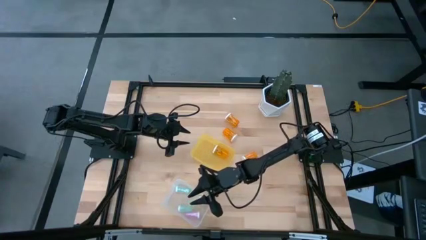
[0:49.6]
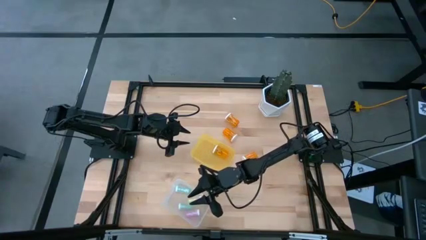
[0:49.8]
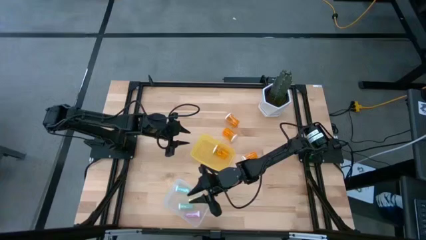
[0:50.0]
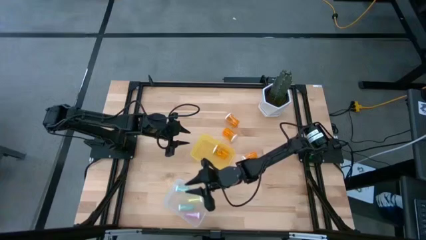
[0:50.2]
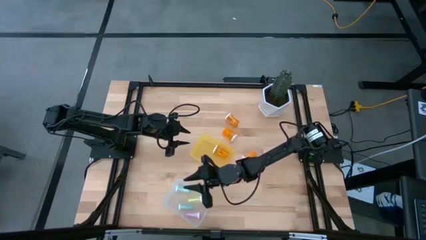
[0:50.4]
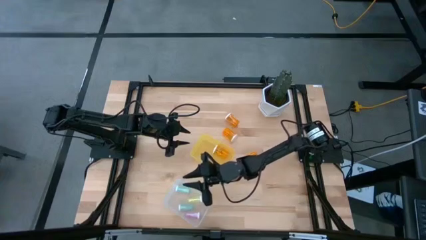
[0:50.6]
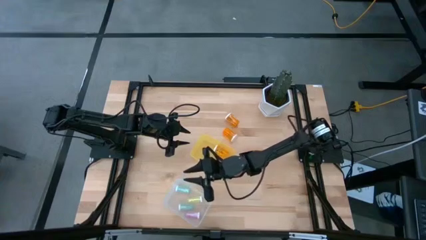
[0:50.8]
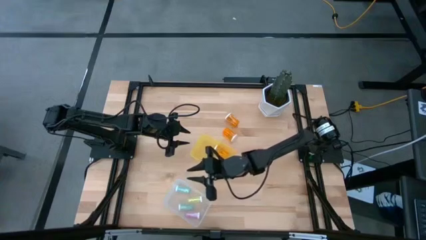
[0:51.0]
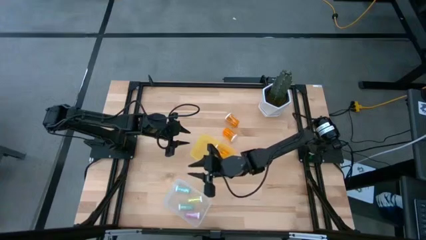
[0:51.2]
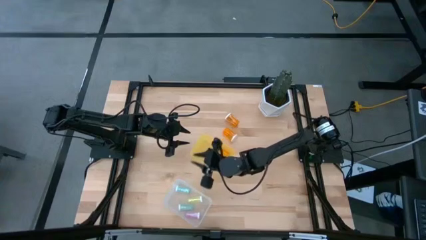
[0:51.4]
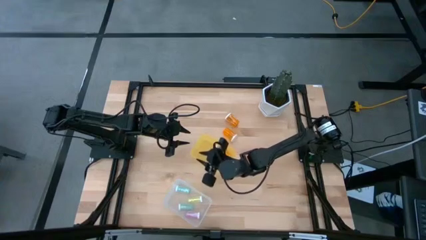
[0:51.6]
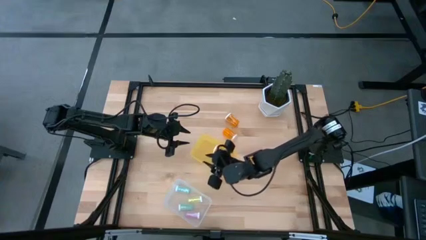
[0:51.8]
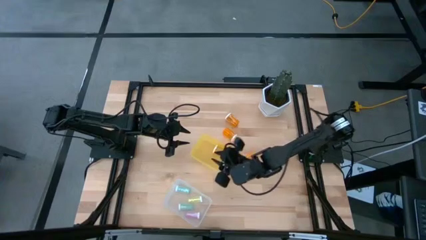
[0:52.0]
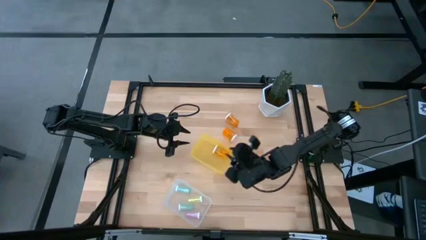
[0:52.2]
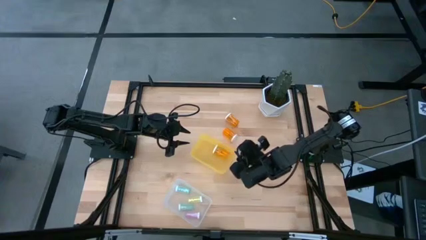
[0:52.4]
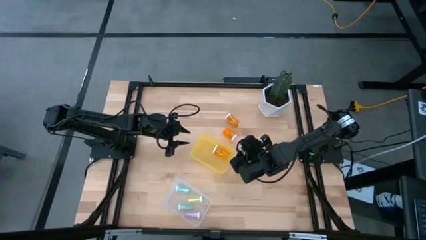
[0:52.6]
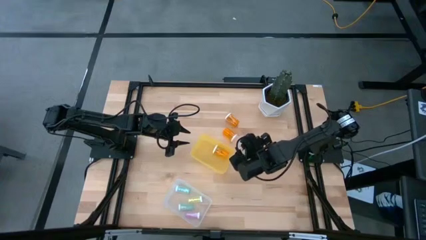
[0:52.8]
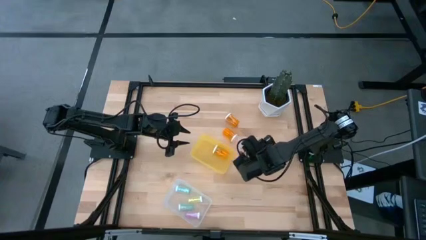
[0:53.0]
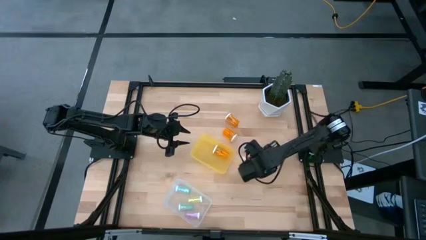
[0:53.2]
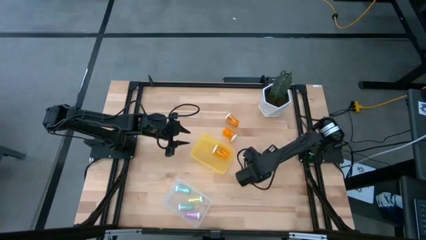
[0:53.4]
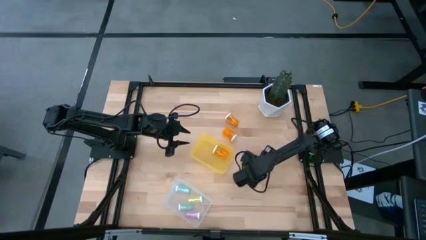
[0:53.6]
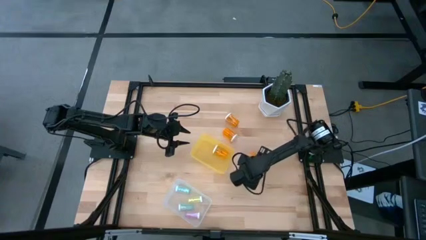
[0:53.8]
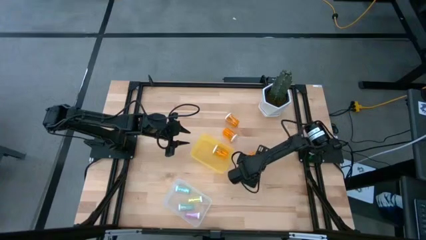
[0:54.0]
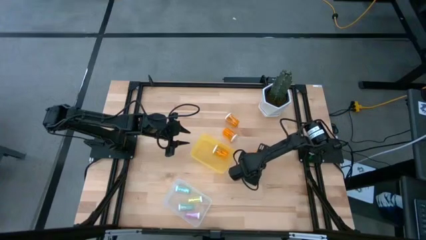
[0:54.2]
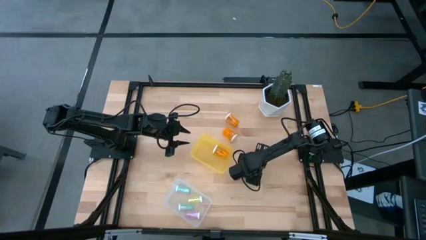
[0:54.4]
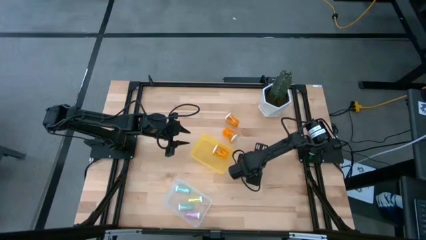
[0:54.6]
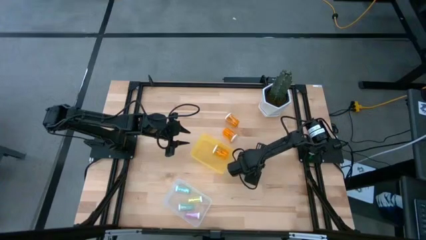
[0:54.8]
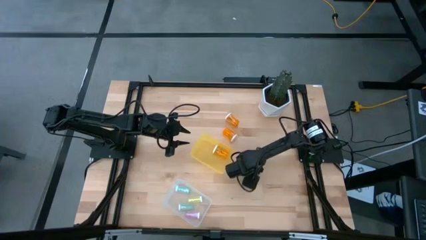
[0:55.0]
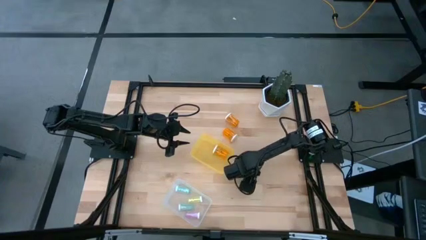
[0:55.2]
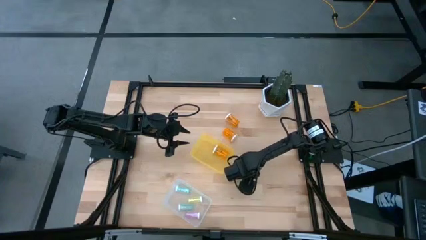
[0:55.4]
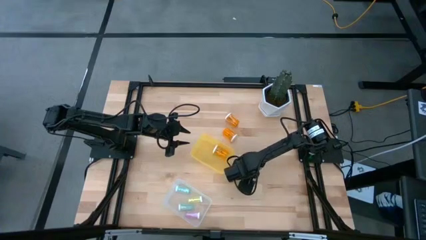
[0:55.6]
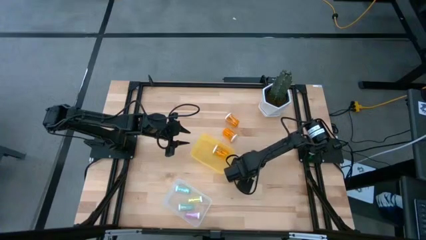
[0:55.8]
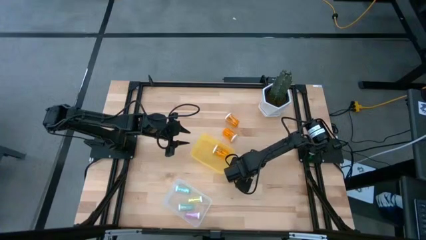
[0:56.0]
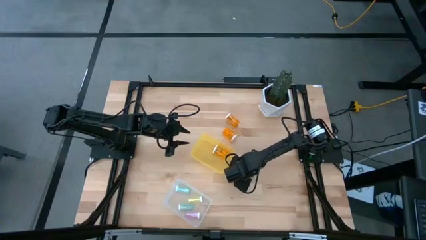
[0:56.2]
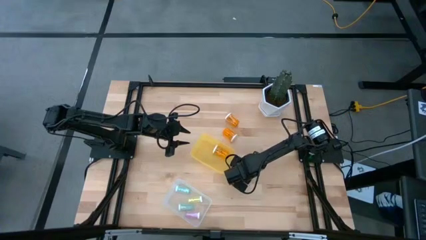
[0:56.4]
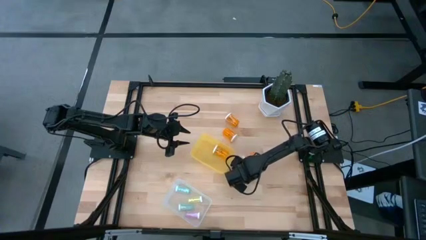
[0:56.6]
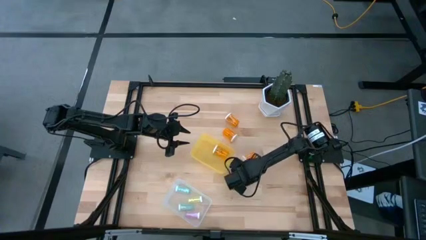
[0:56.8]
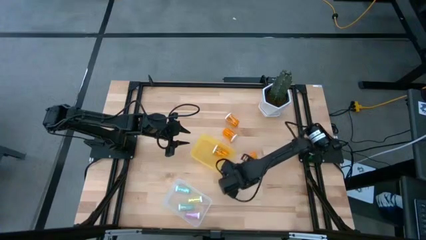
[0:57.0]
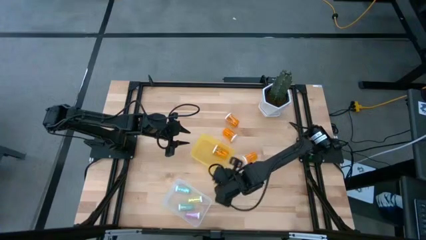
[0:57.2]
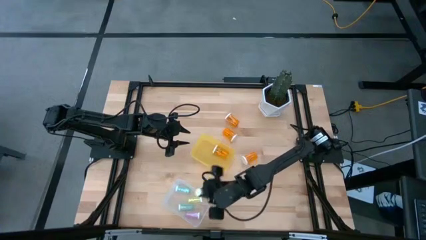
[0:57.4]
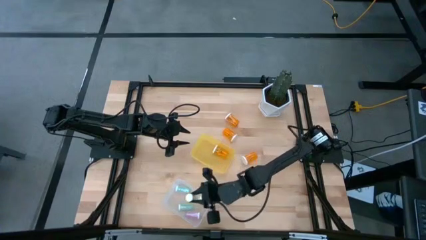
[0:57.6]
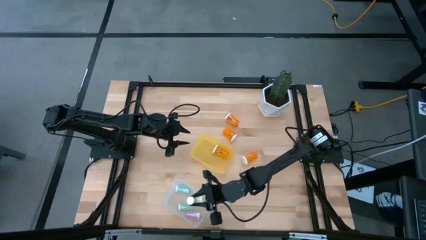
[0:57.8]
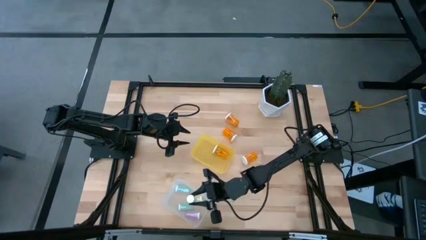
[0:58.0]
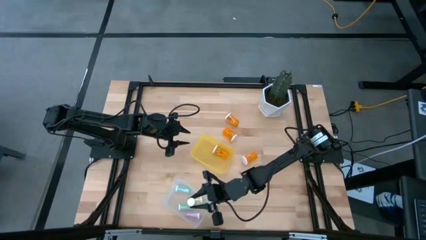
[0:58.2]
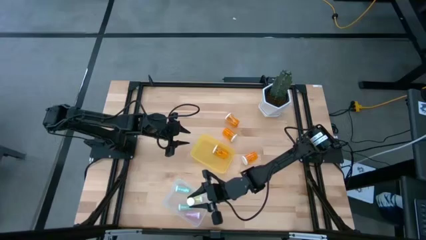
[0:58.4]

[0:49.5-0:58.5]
Task: Pick and place medicine bottles into bin by pill shape (circle, oval)
Put the yellow bottled tablet into the transparent bin

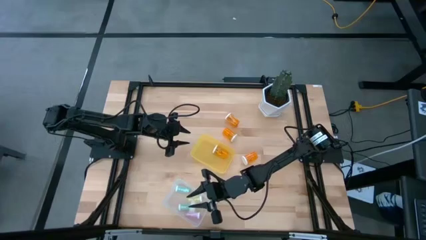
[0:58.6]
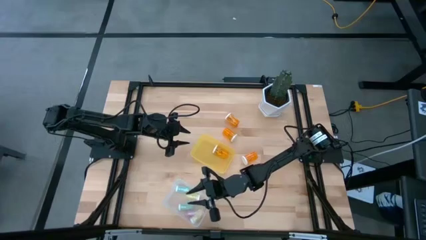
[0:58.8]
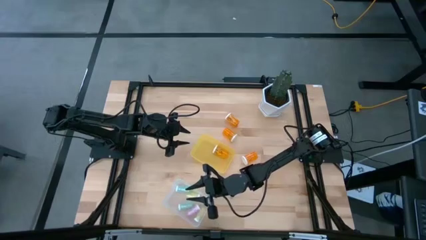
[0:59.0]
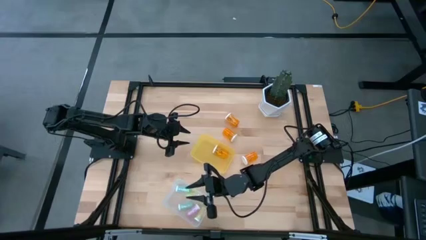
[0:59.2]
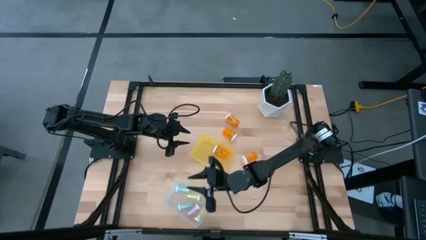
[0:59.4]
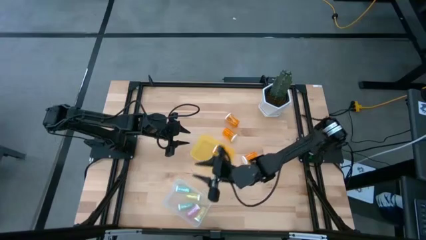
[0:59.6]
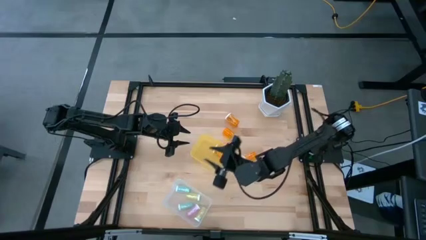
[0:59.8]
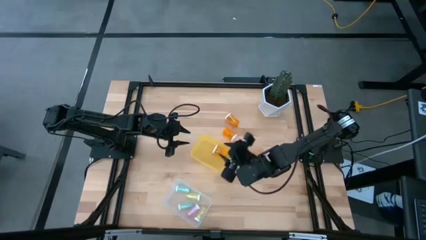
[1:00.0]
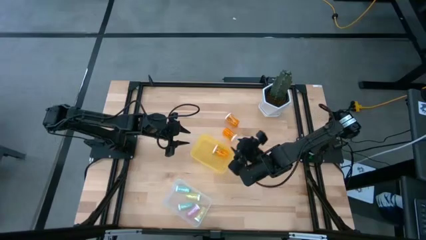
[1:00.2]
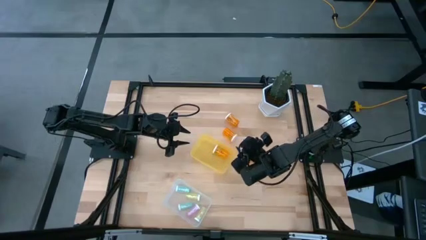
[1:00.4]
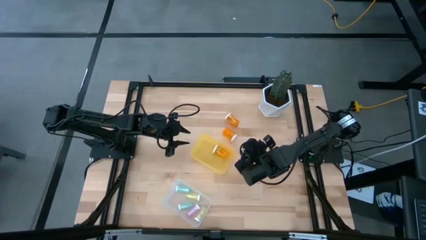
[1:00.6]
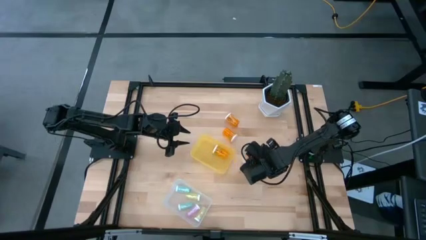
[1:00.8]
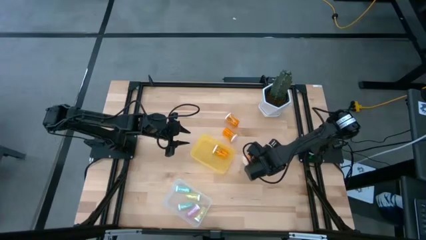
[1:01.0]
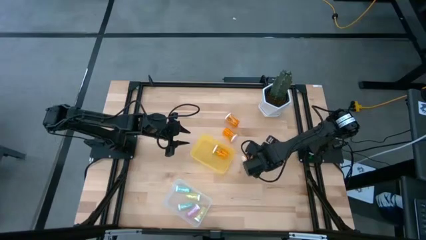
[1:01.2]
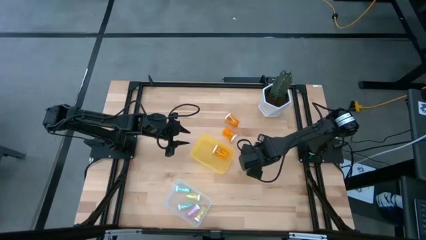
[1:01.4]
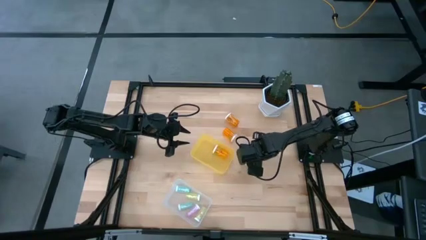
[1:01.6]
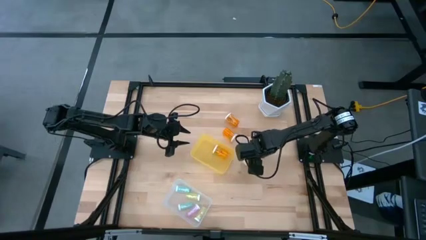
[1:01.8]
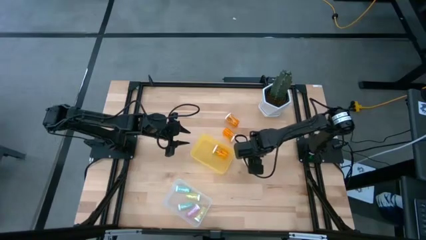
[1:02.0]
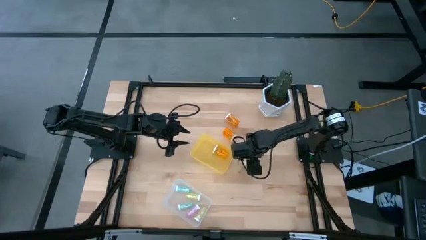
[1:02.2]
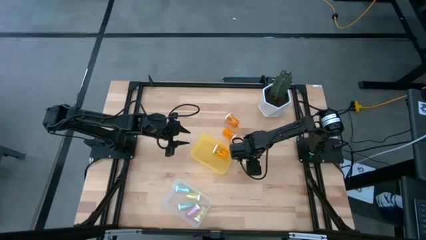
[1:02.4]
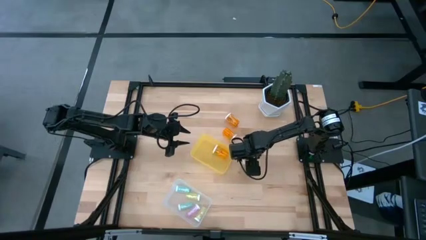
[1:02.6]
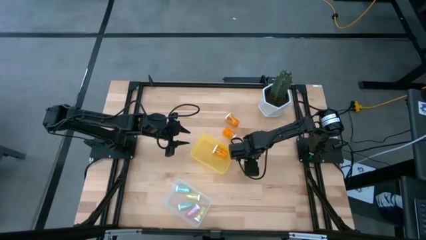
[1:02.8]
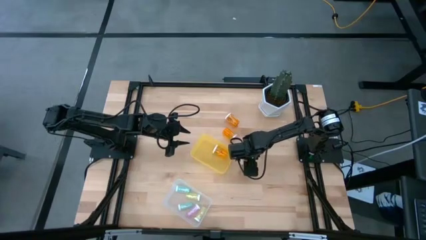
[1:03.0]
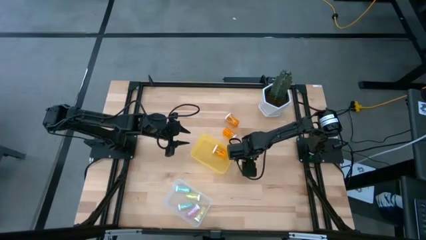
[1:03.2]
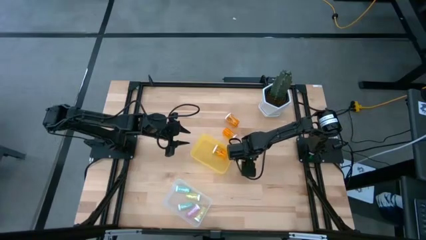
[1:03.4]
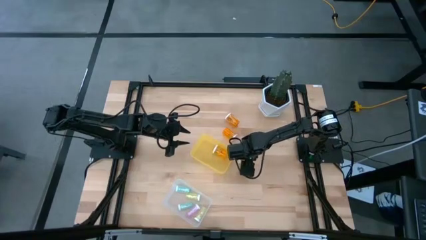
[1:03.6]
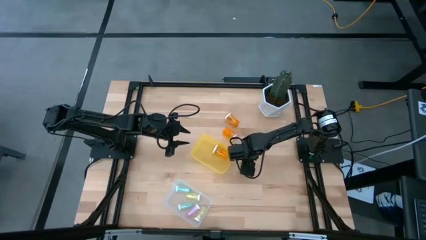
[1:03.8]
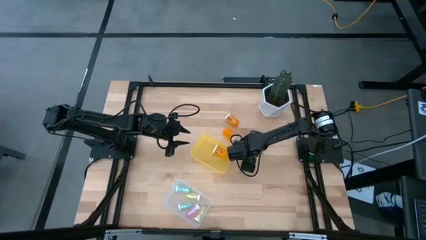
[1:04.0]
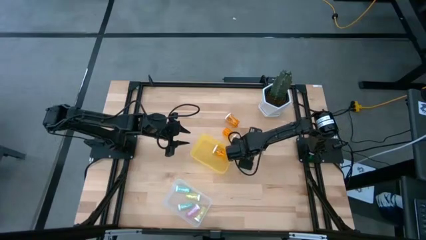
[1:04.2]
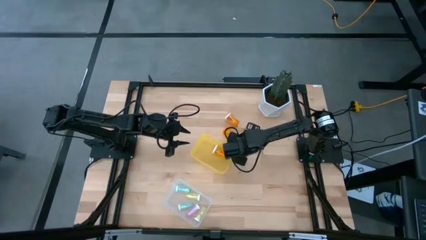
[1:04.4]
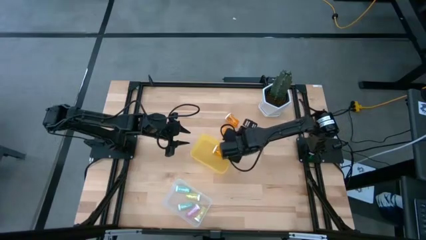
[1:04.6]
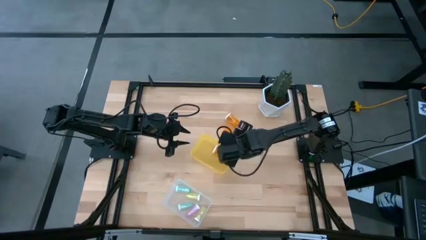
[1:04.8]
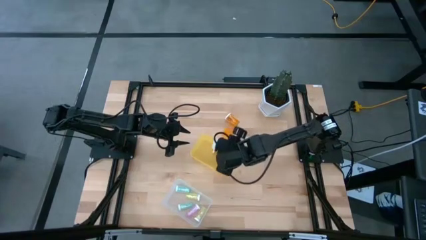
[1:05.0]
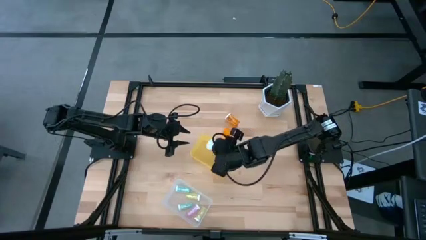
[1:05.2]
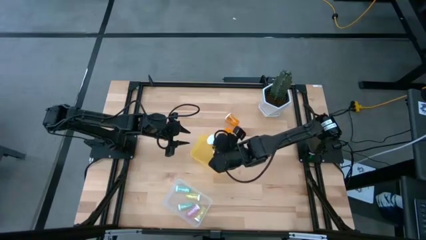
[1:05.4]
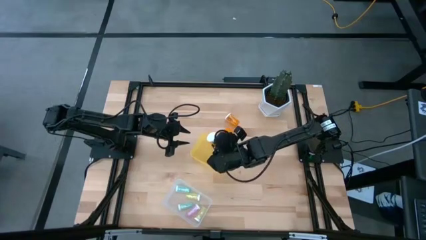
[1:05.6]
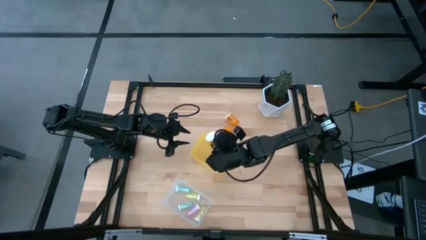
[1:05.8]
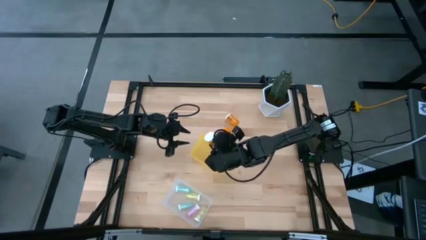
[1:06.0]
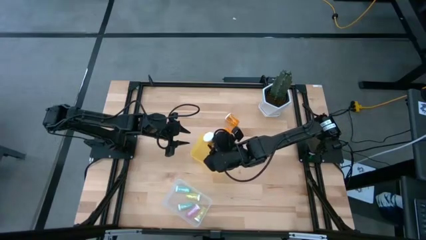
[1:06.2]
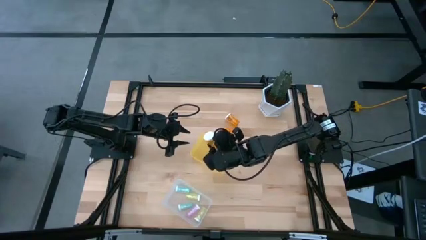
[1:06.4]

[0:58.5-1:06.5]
Put the orange bottled capsule into the yellow bin
